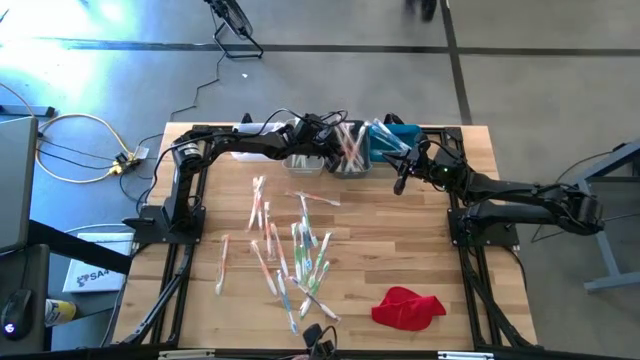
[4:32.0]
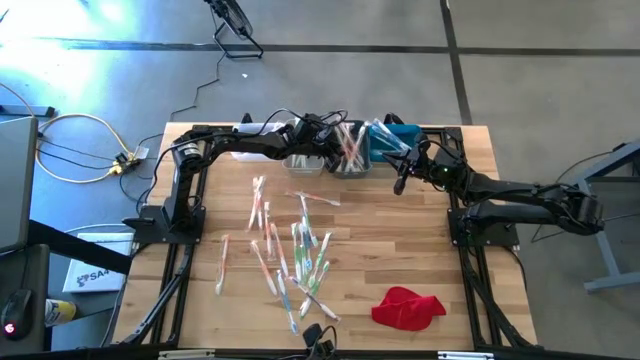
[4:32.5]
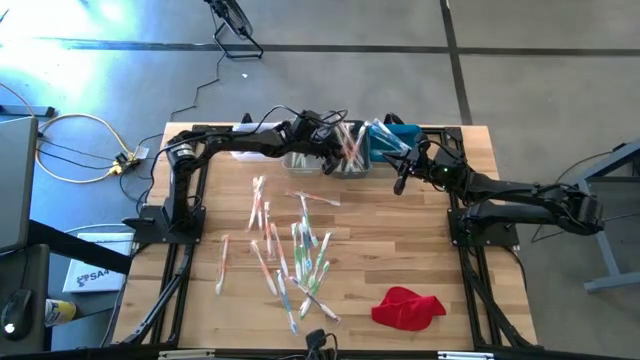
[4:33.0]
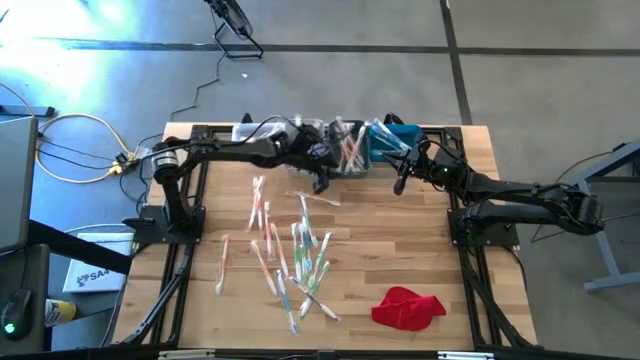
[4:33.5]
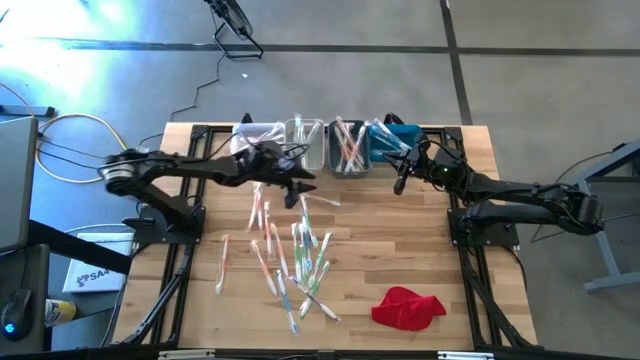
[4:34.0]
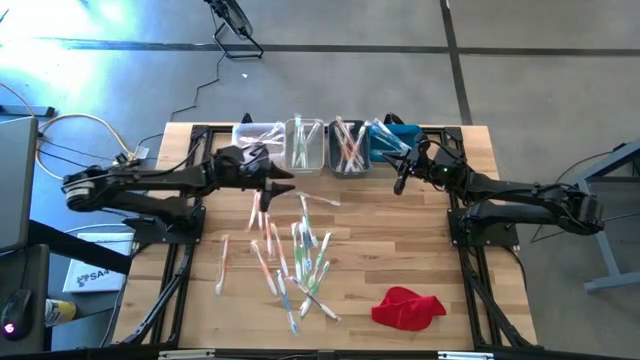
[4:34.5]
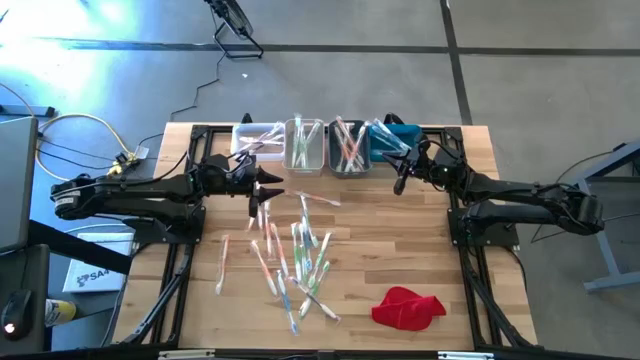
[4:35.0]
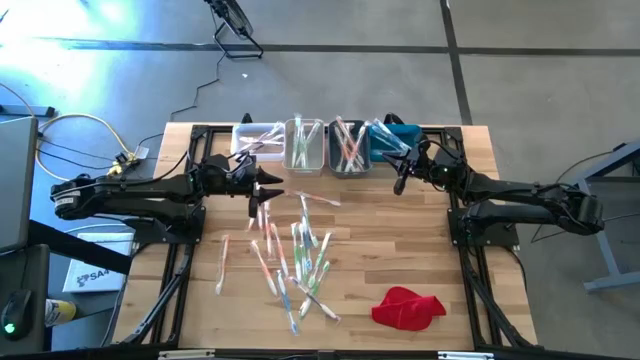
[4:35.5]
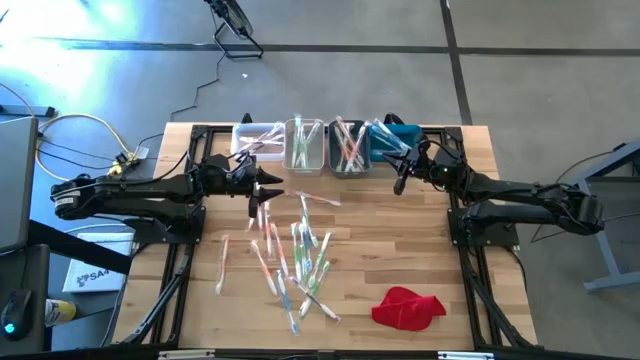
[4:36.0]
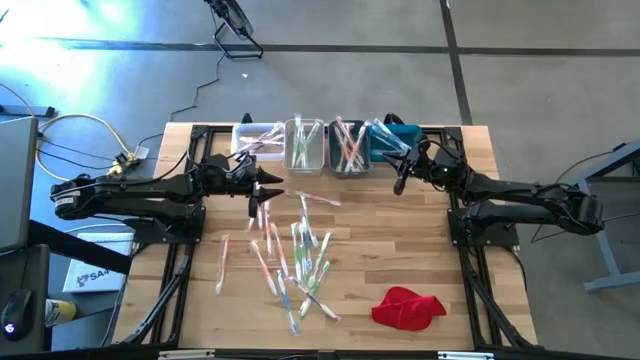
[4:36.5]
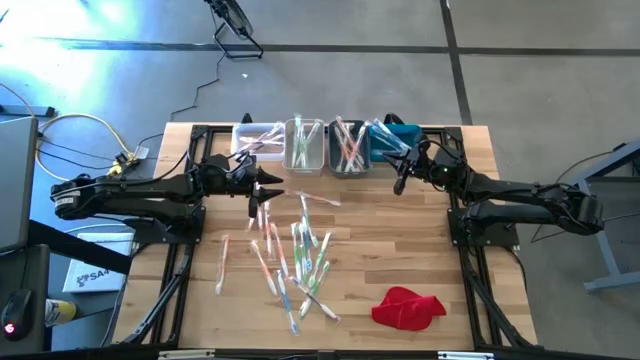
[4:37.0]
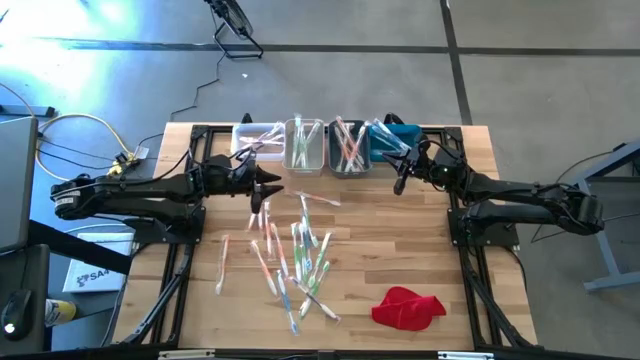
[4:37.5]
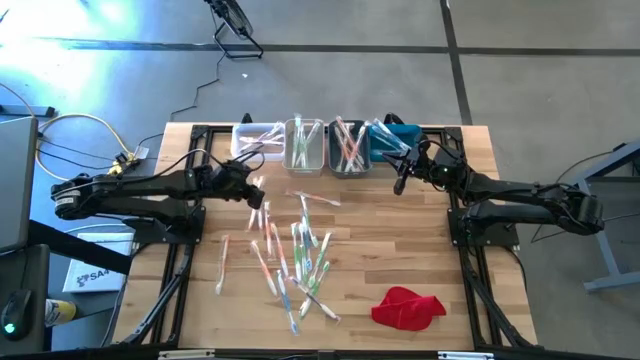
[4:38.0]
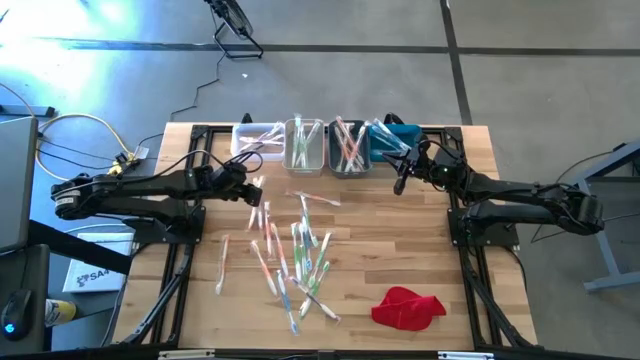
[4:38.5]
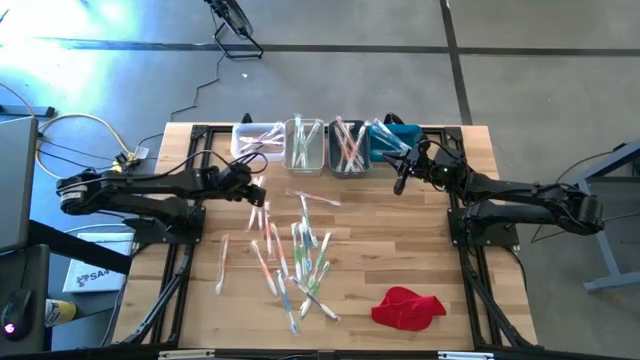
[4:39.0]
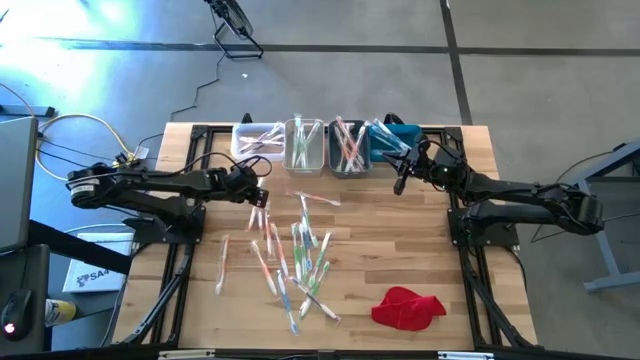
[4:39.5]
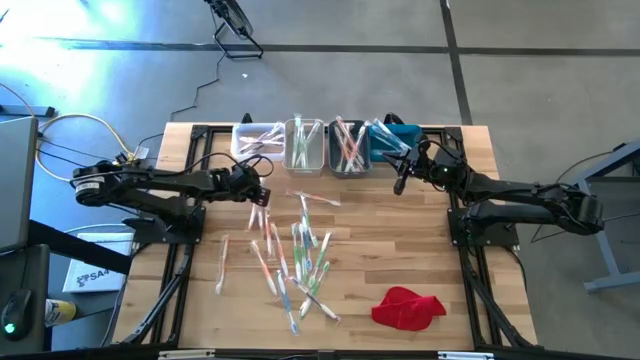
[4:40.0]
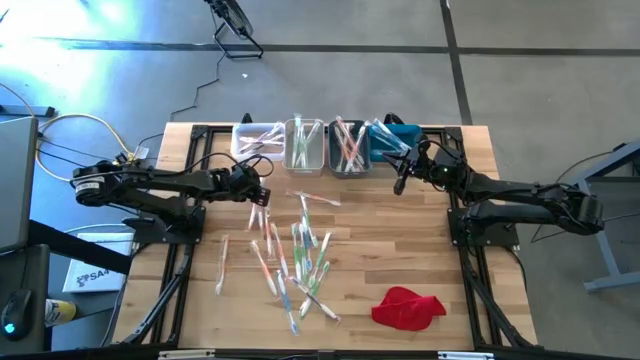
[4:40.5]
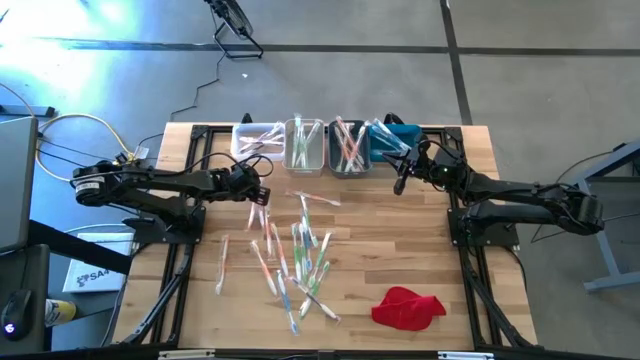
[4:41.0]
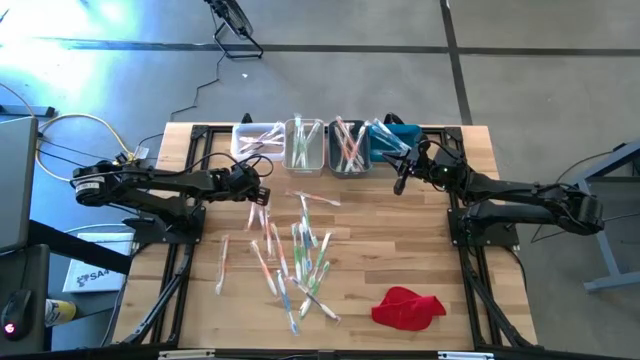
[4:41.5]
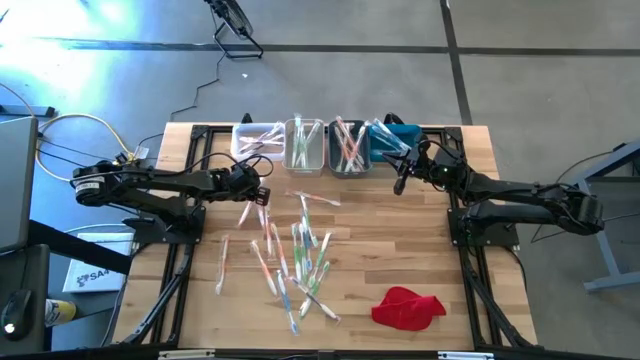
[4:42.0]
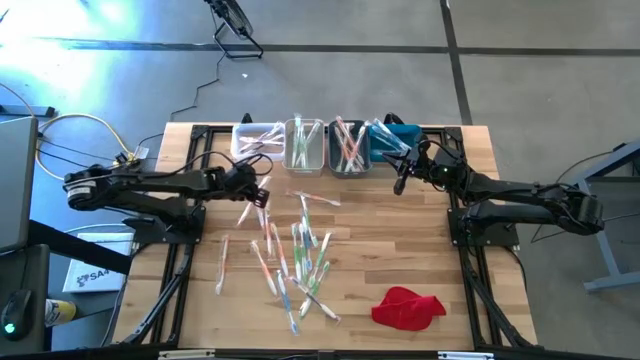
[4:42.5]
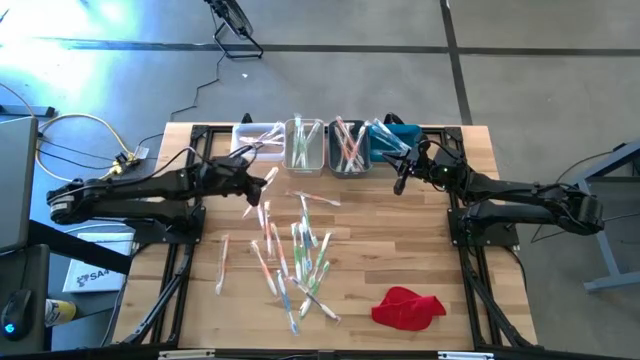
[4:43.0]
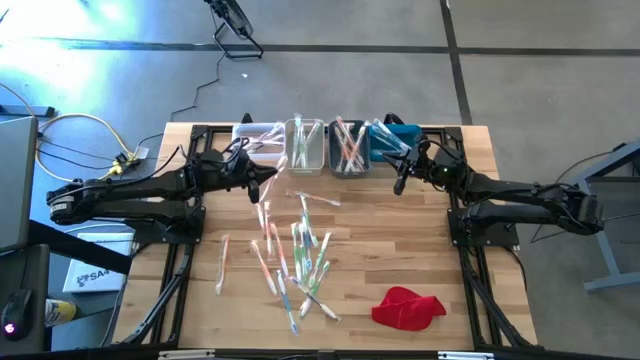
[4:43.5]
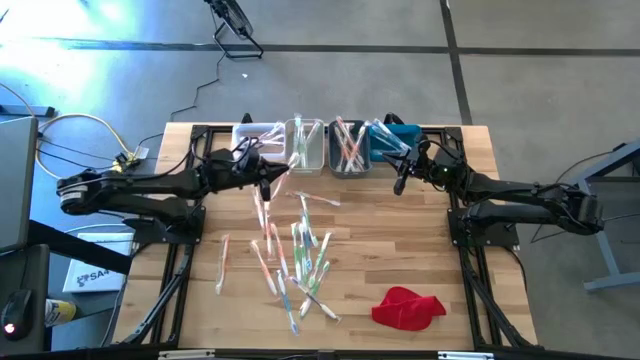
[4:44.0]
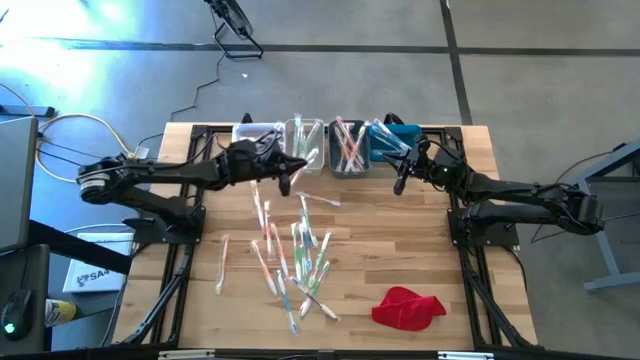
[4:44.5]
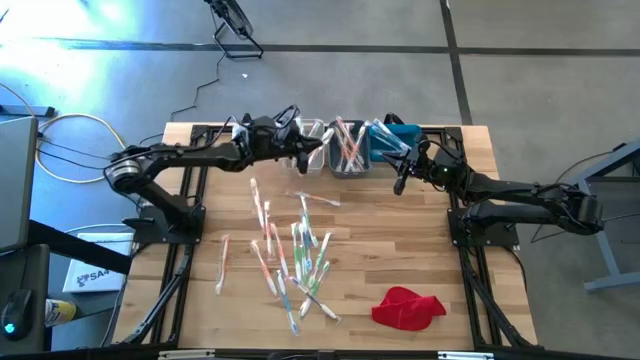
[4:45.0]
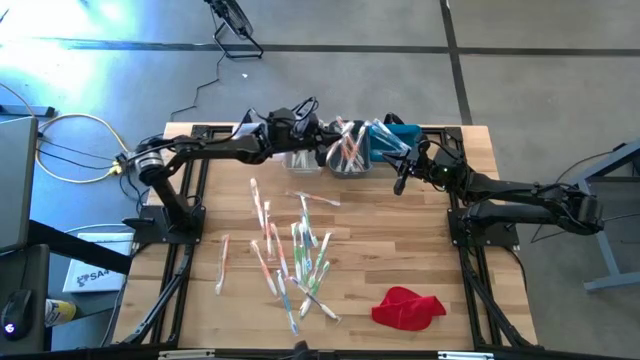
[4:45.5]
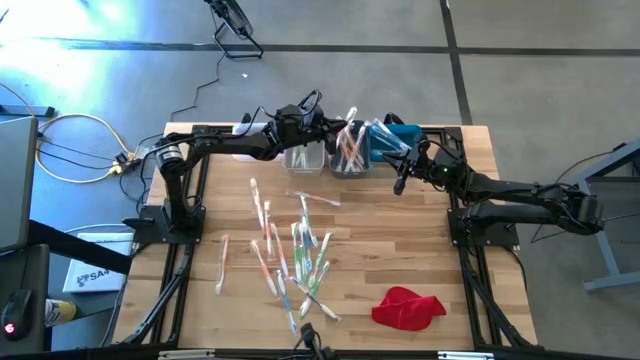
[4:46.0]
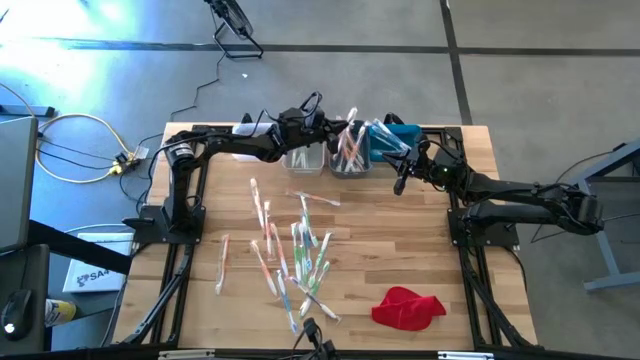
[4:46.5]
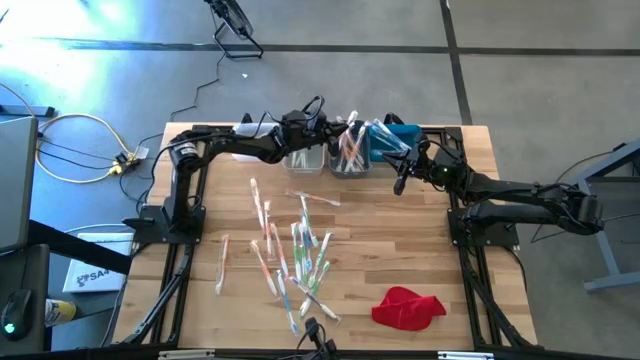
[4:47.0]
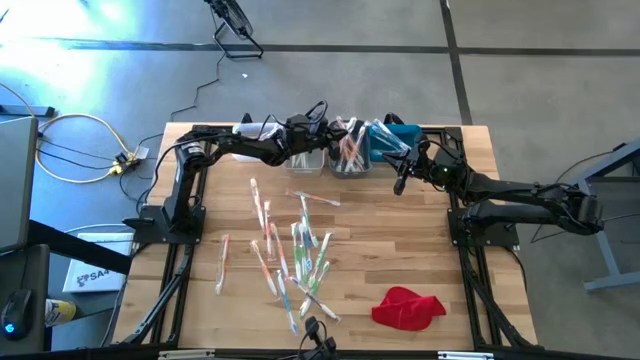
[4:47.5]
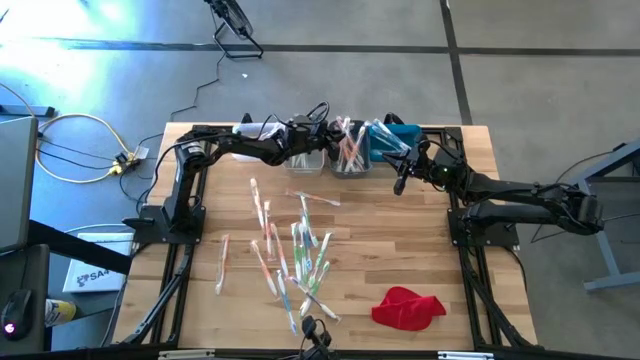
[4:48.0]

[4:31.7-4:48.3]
Task: Pick & Place Toothbrushes
Put the orange toothbrush into the dark green bin

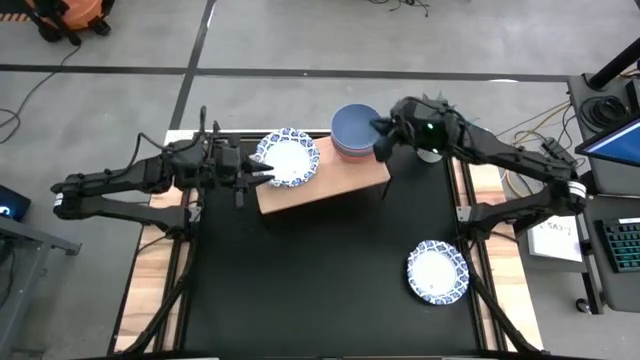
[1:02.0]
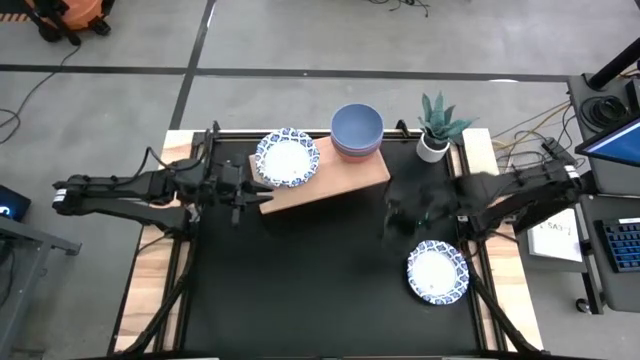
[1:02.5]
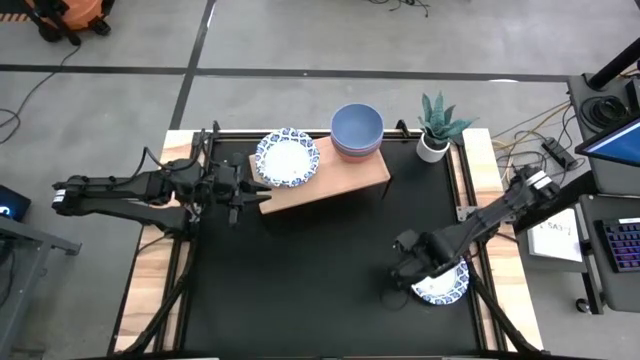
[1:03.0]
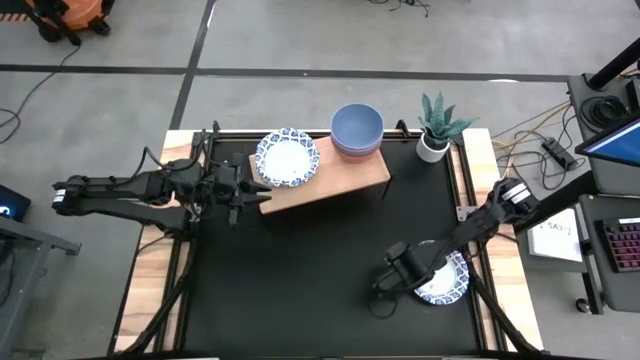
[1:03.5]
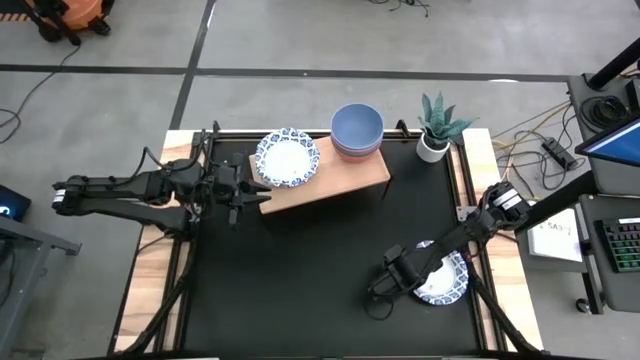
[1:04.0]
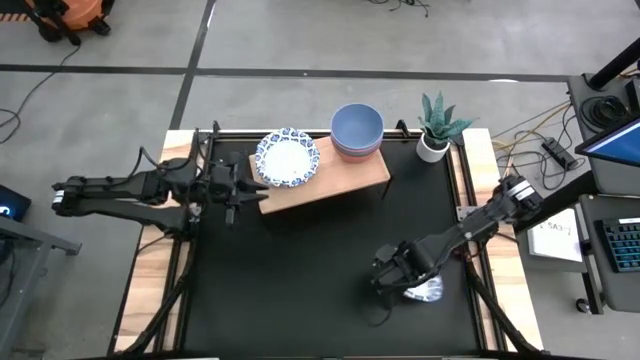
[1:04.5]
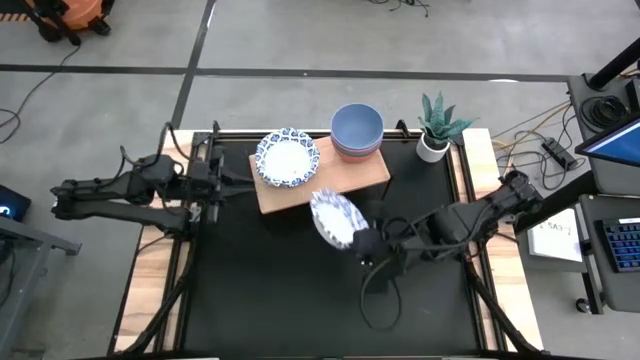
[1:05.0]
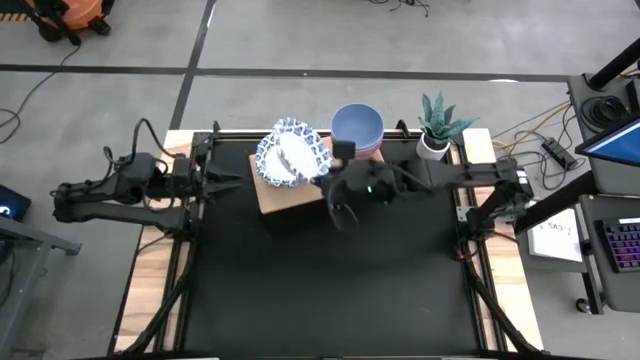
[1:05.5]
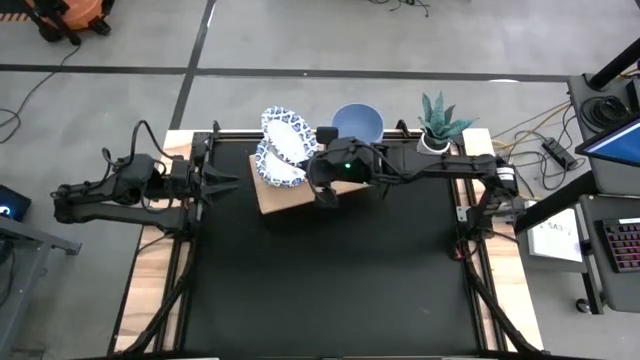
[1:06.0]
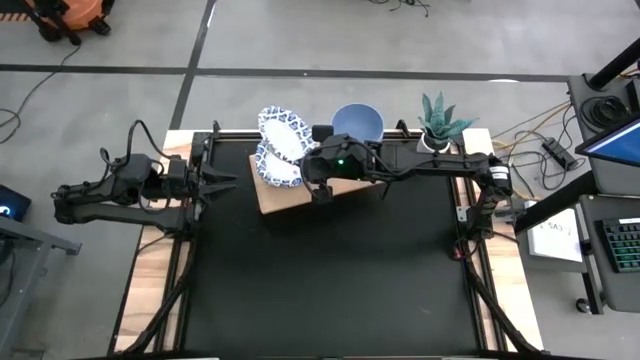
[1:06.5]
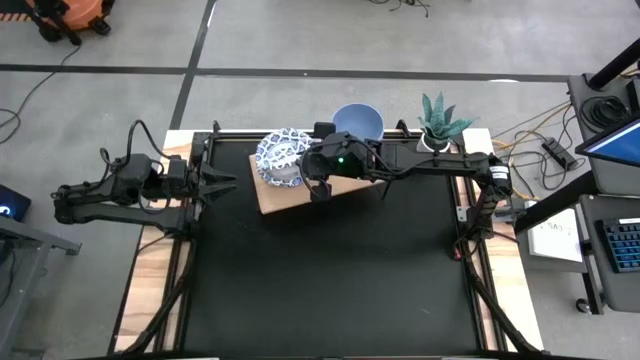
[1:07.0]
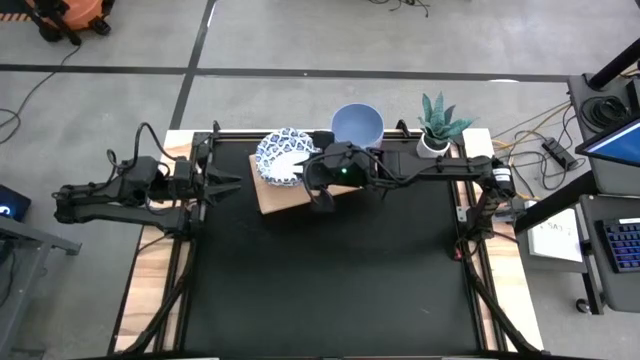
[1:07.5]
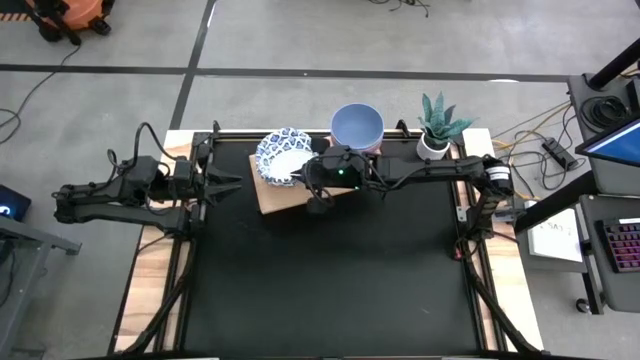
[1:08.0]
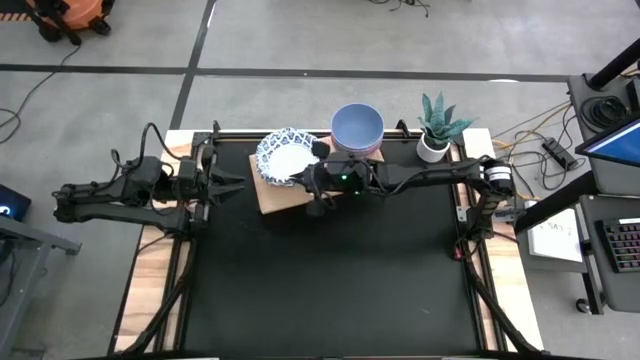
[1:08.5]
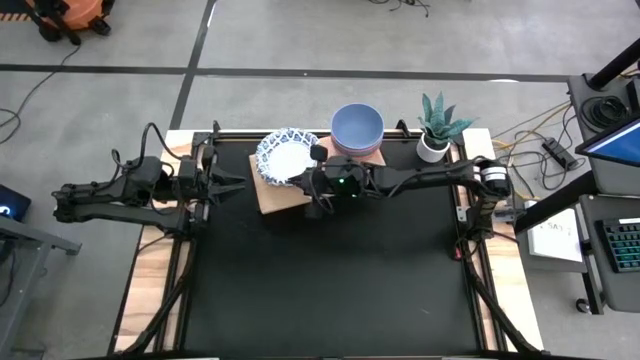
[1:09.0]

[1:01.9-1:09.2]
Task: Place and stack bowls onto a shelf
Stack the white and blue bowl on top of the white and blue bowl
